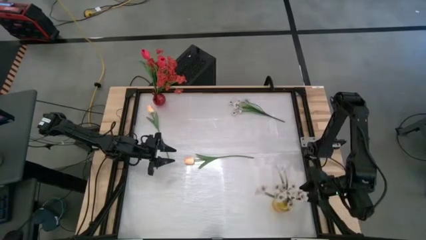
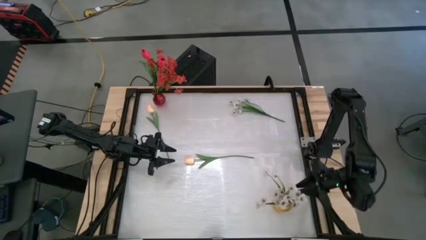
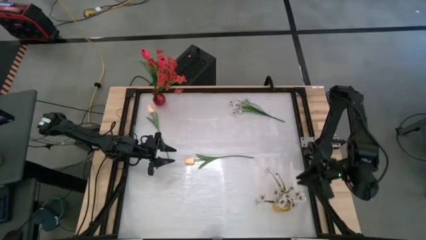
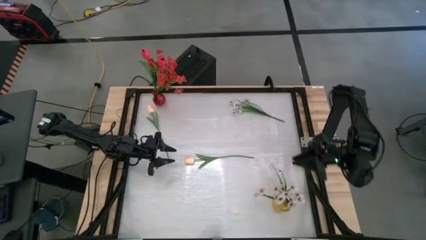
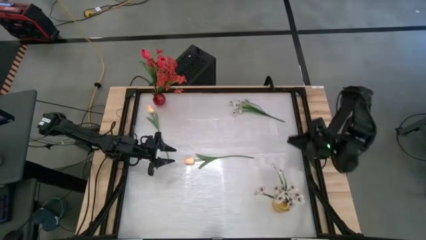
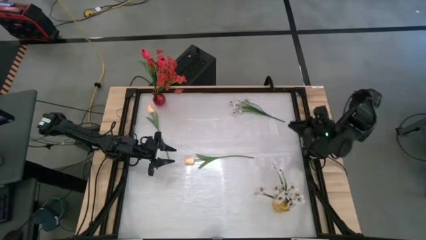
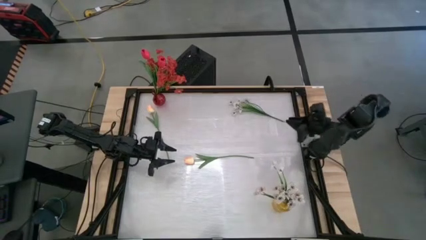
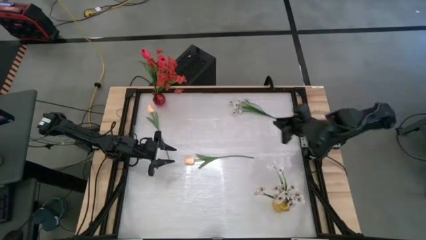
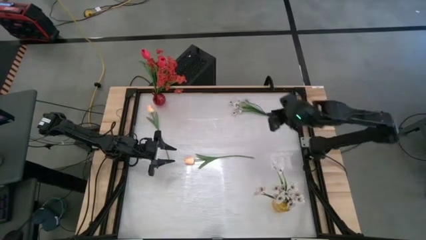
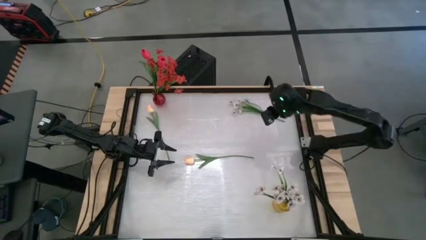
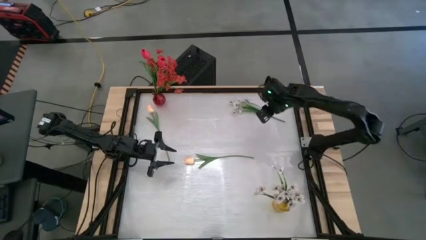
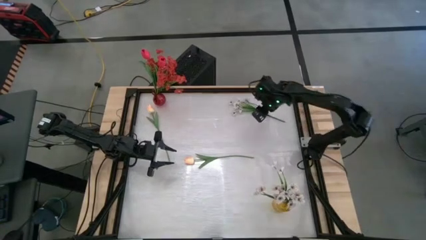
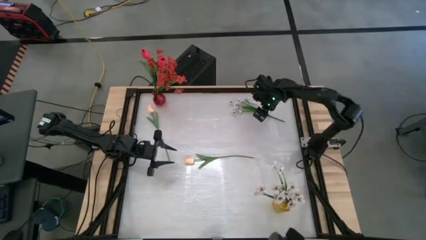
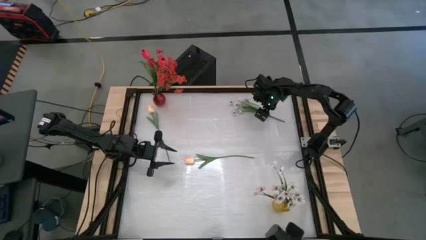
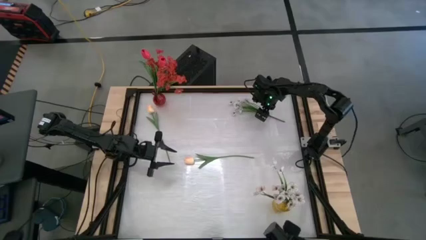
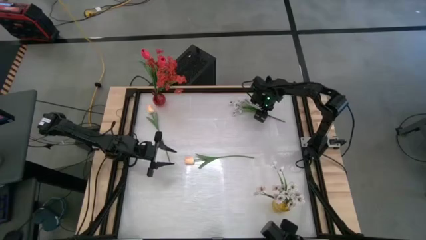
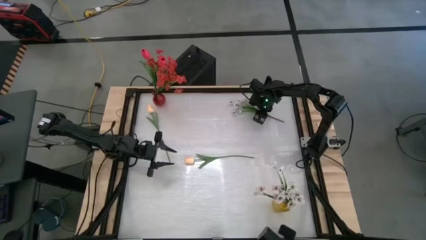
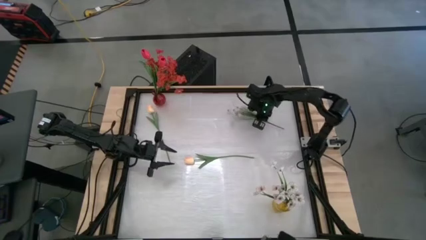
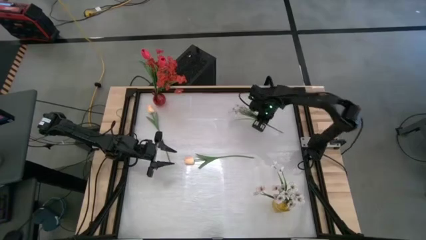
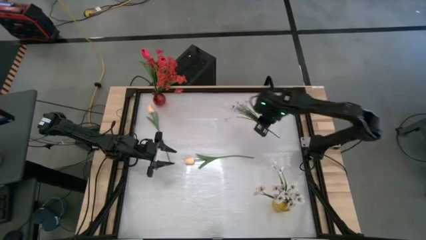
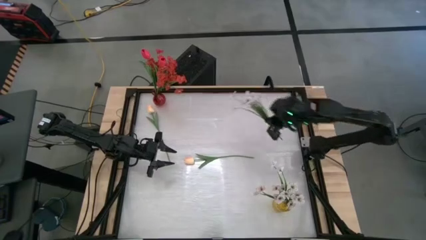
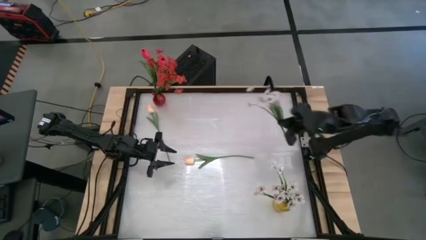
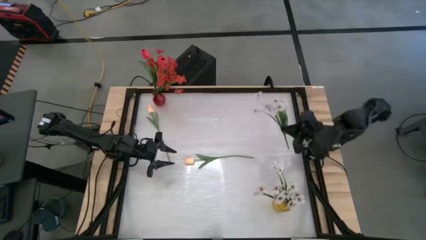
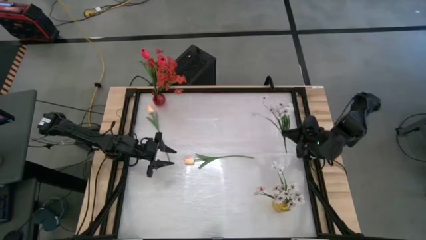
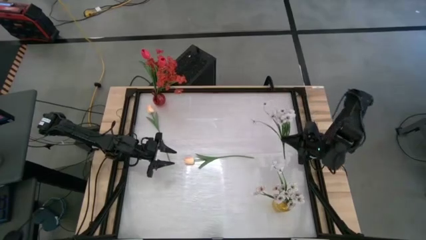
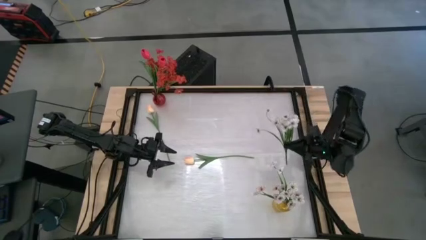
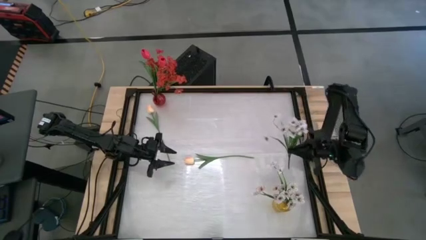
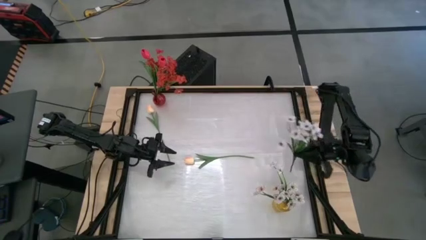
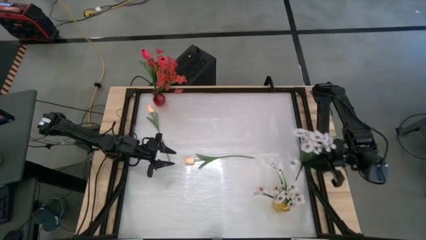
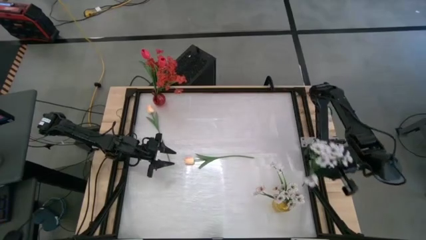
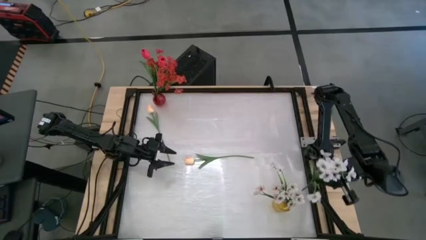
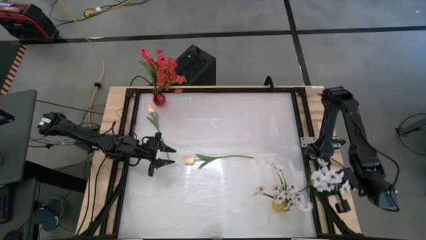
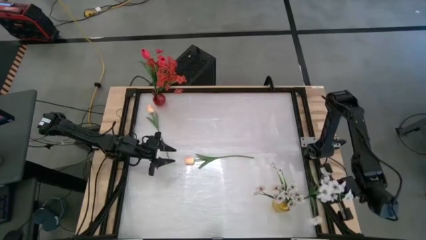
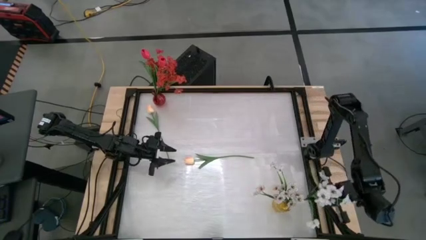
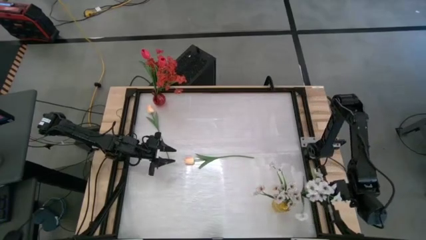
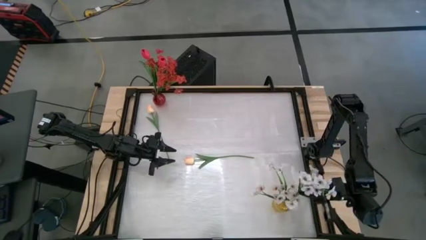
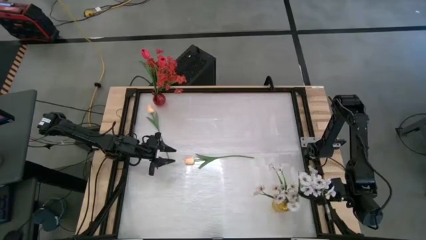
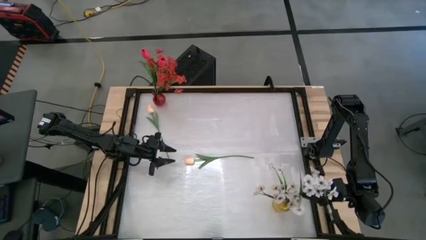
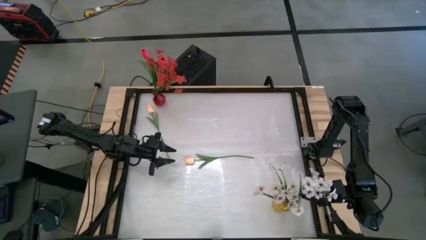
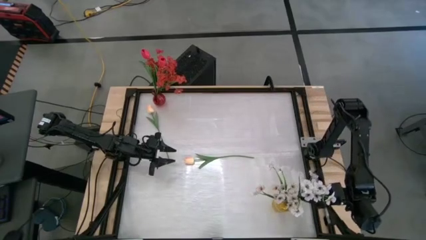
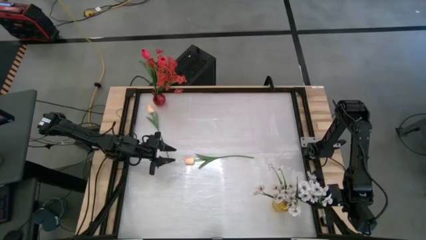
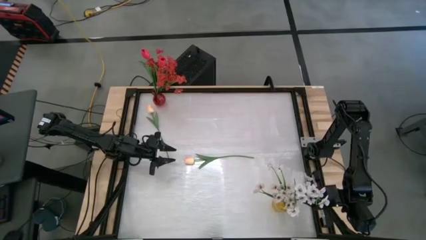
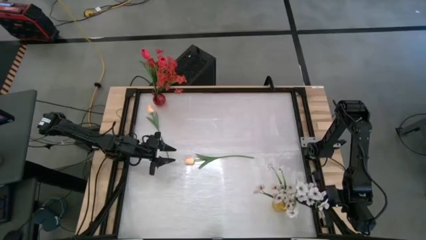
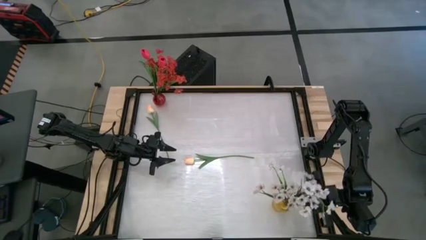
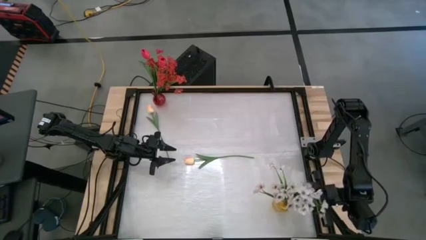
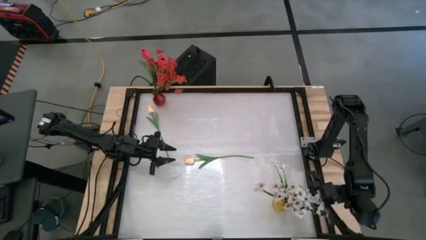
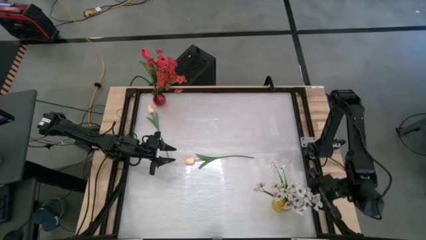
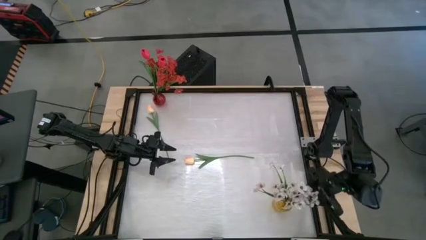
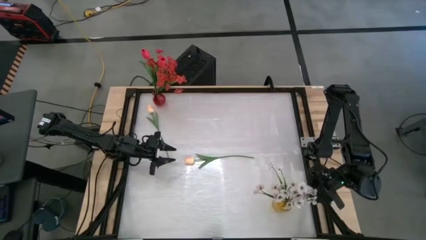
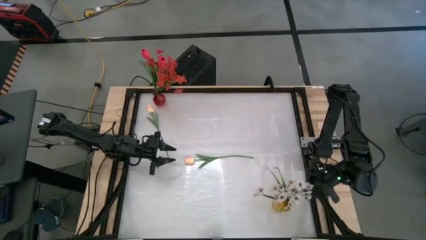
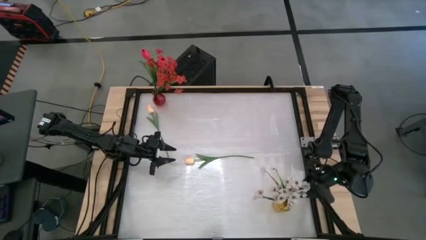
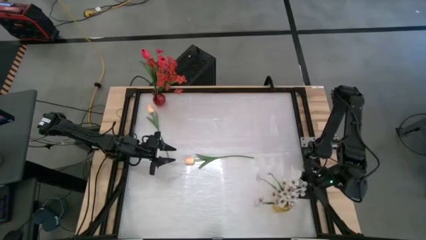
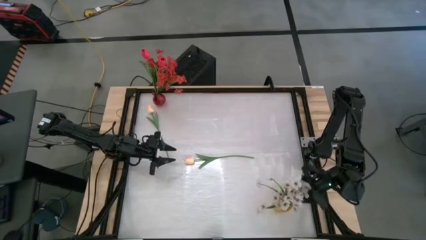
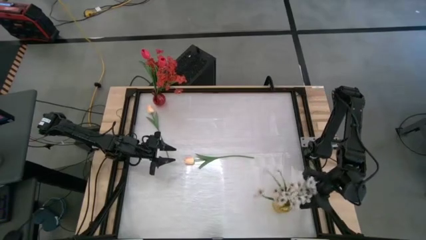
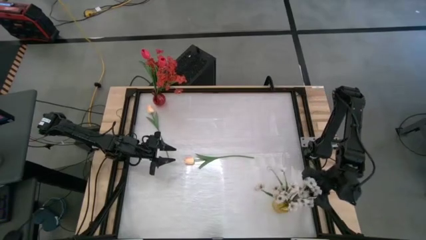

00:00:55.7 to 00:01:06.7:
Task: Sort flowers into vase by color
Put the white flower into the transparent yellow vase

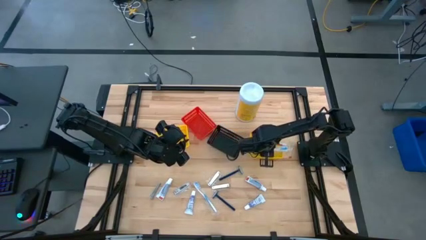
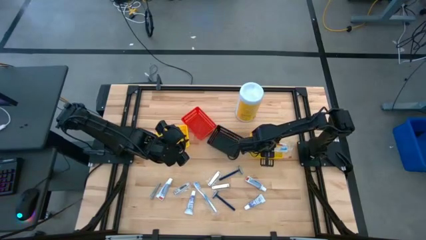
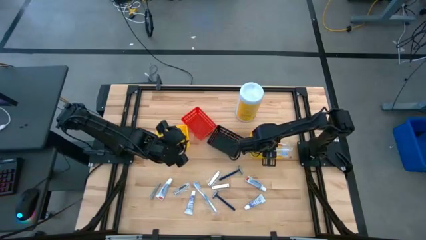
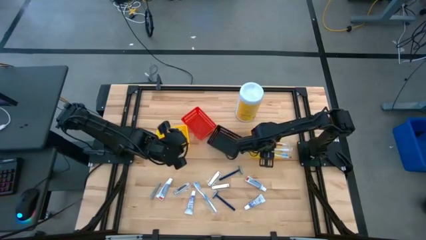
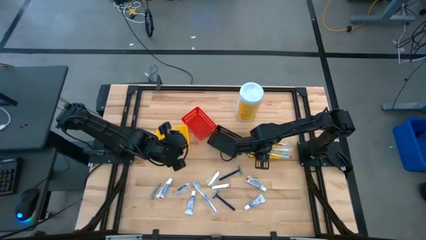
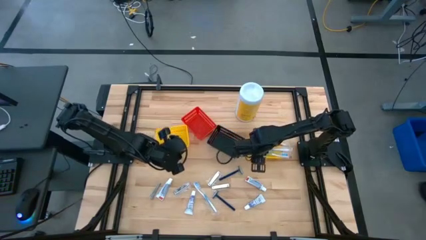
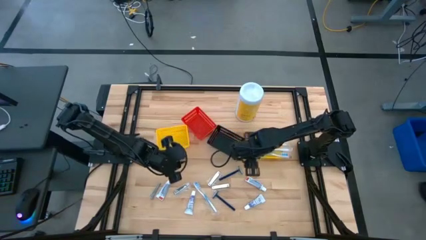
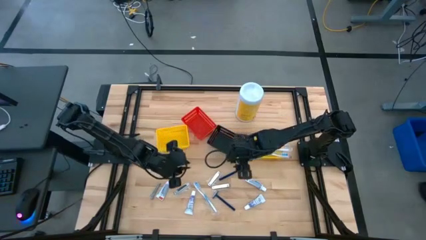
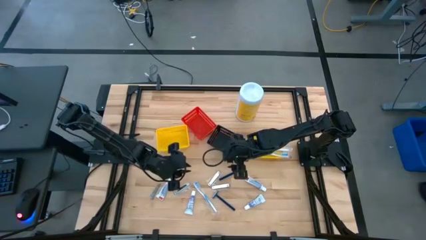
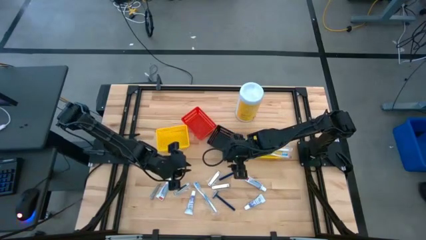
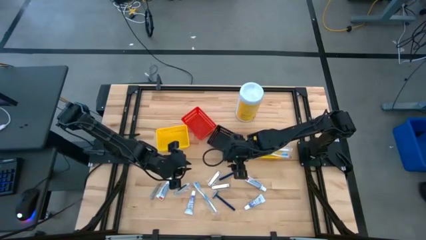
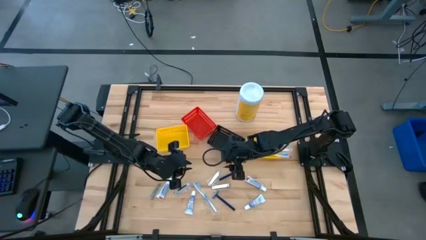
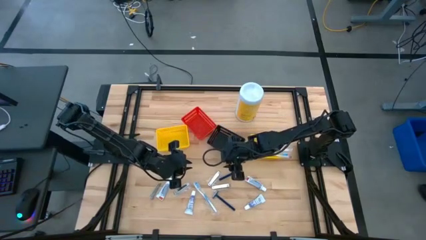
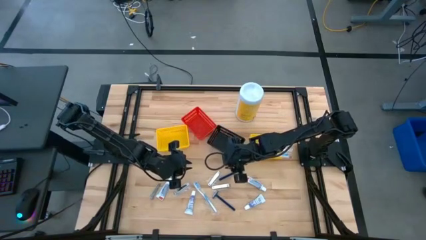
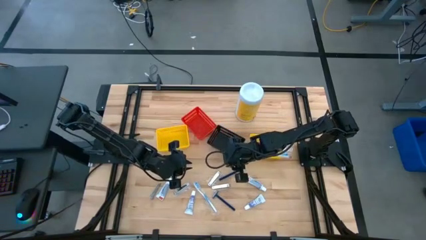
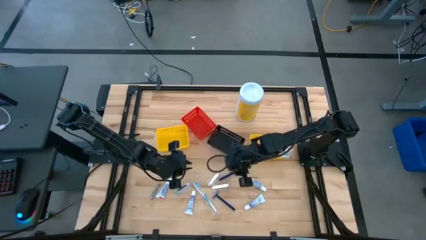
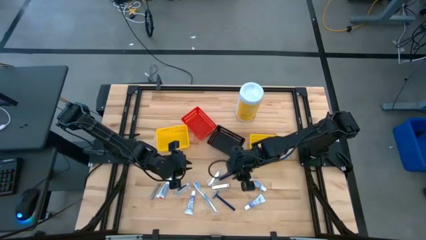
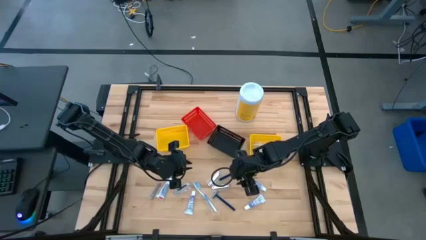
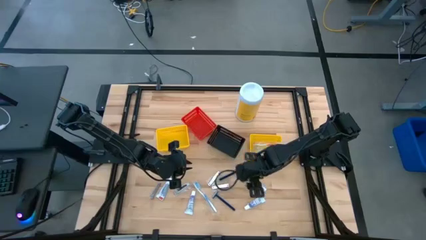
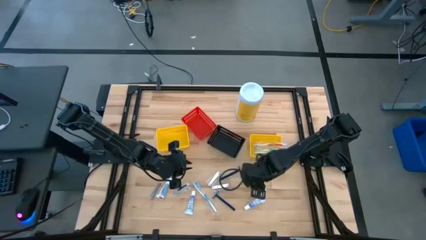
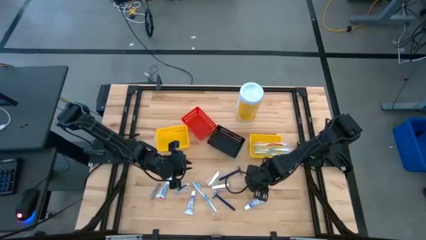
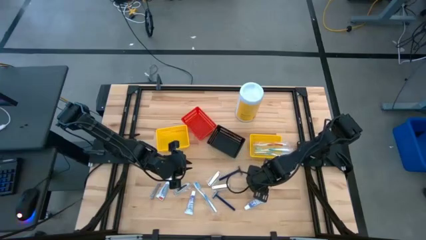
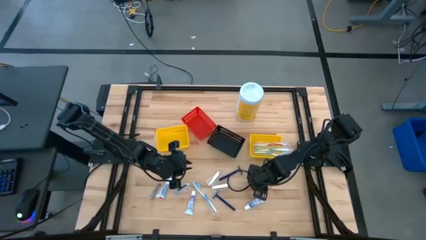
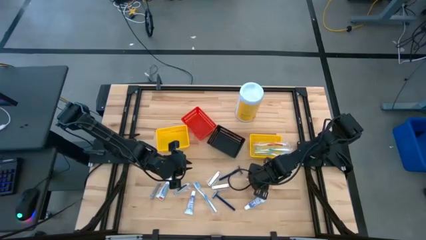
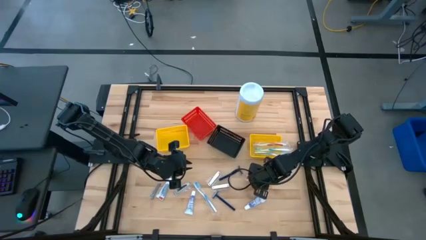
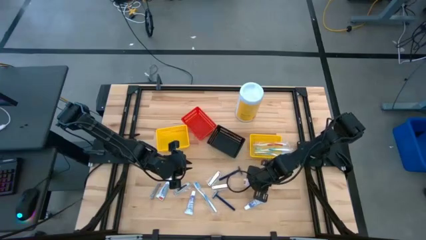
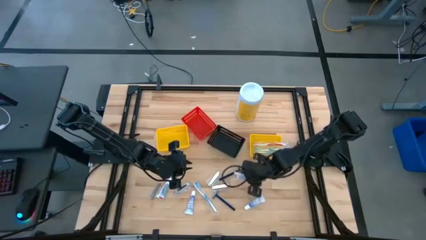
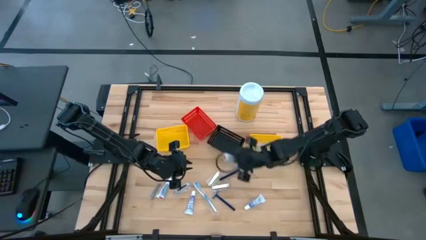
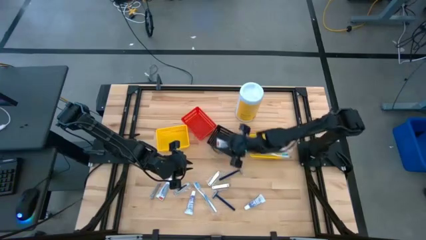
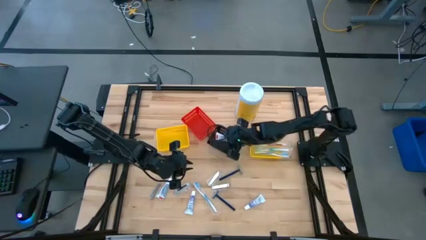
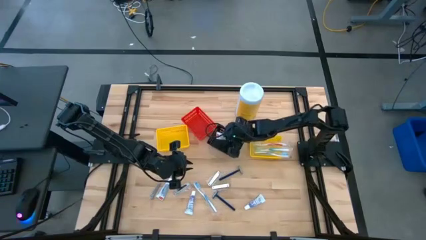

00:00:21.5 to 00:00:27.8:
Task: Pick & Place Travel size toiletries
Put the toothpaste into the black bin
